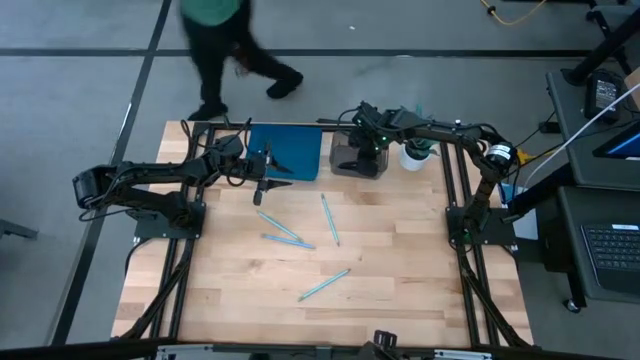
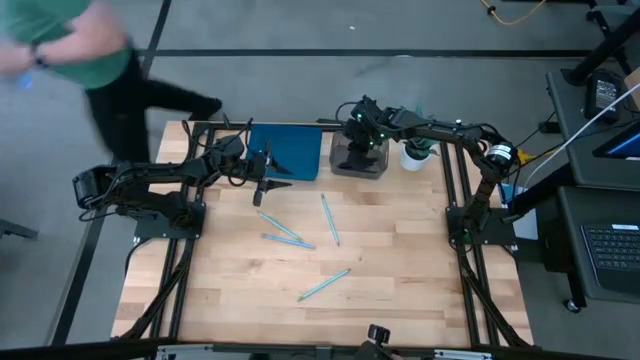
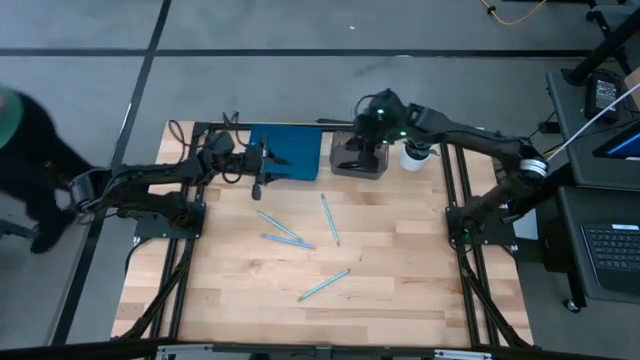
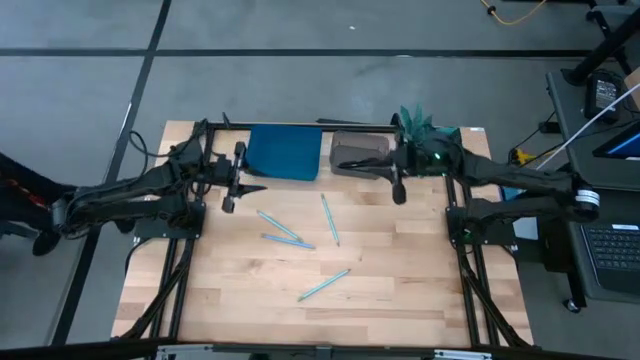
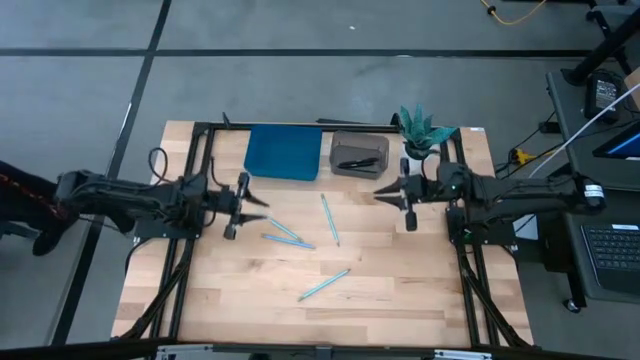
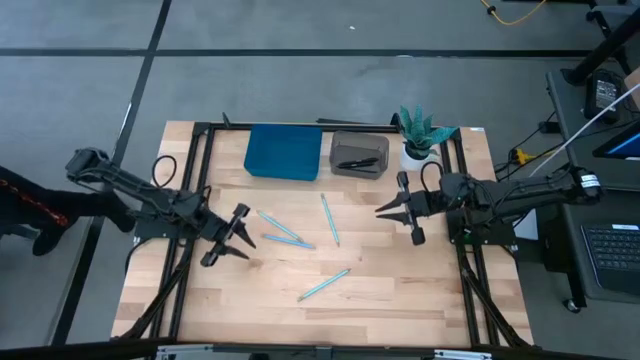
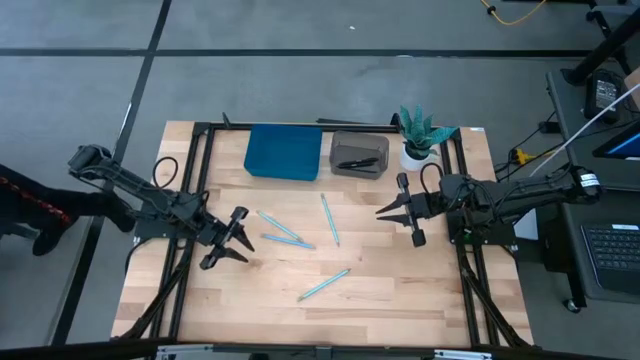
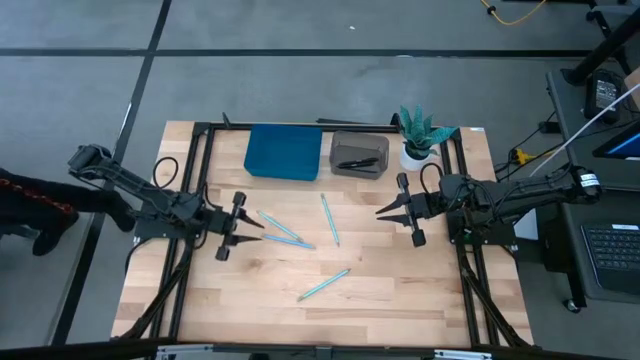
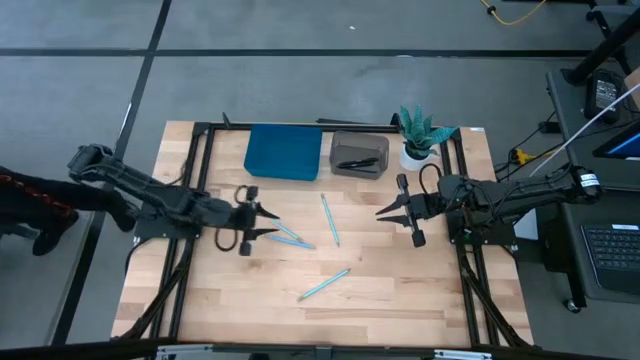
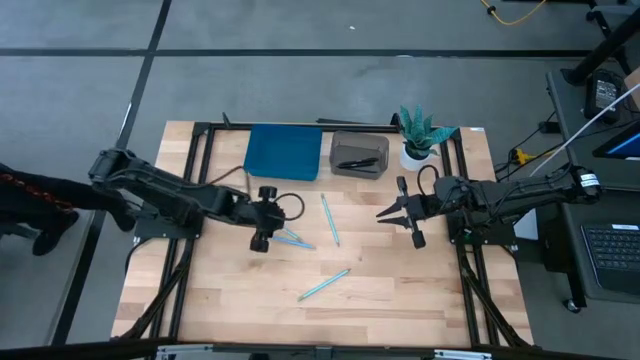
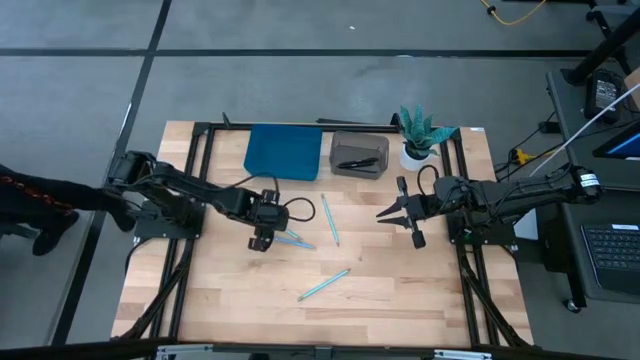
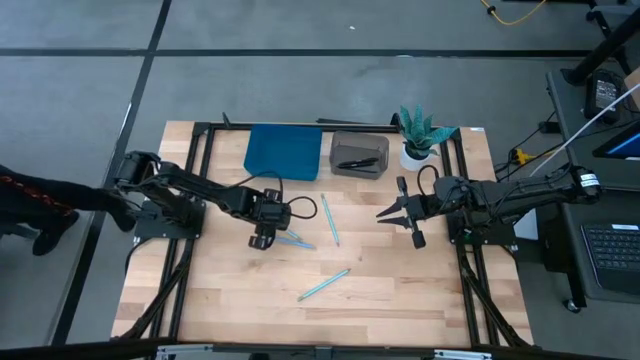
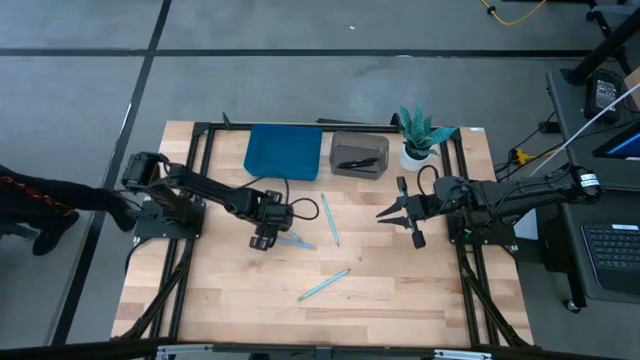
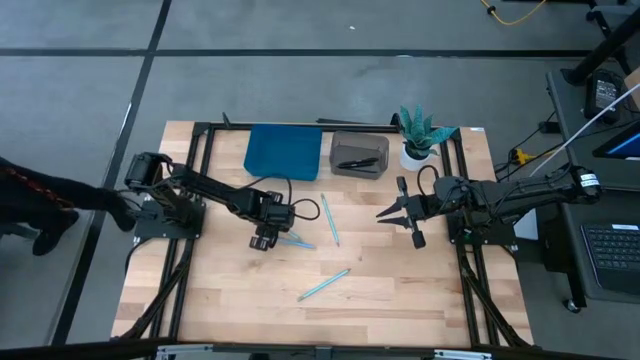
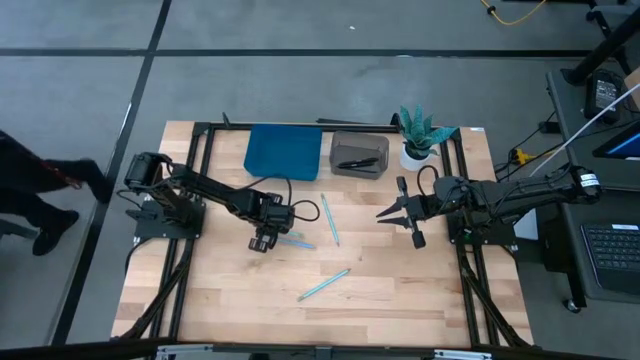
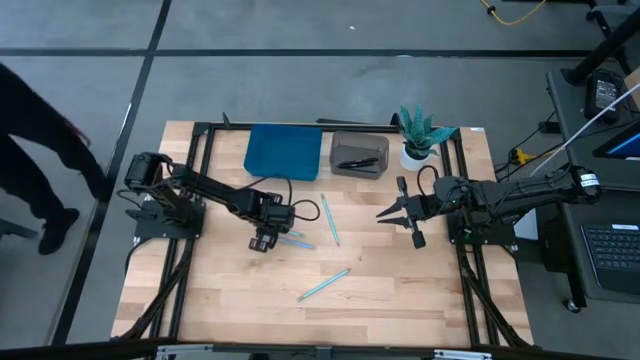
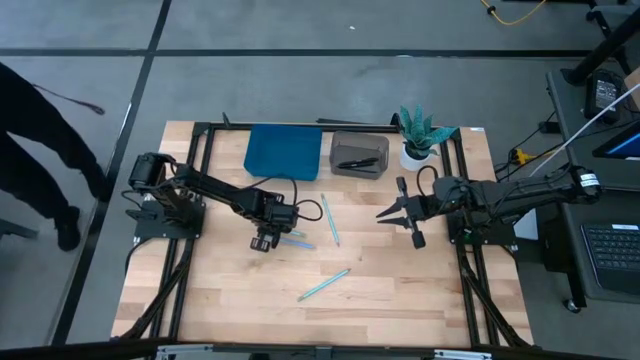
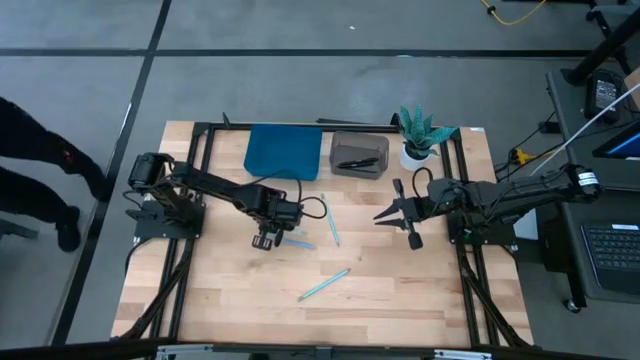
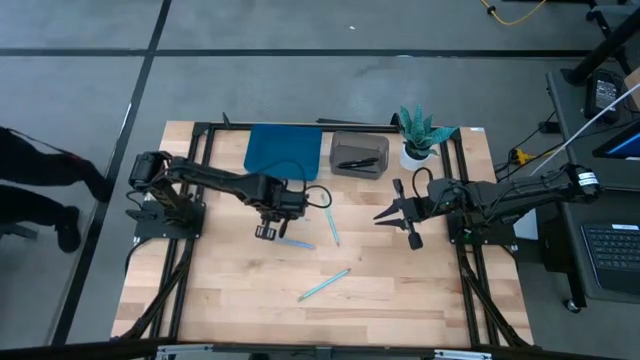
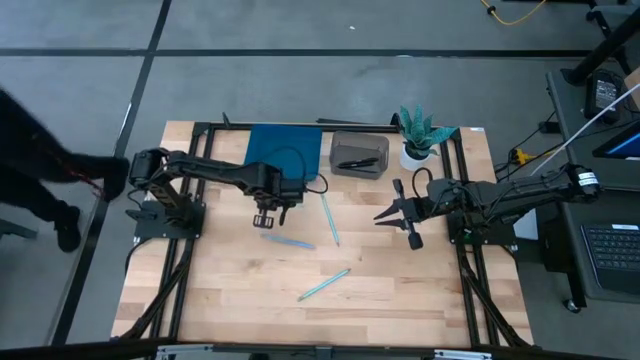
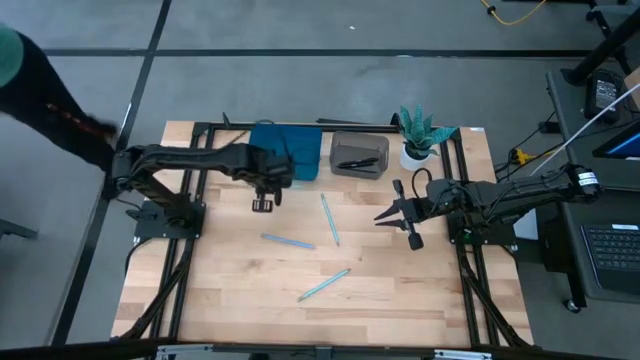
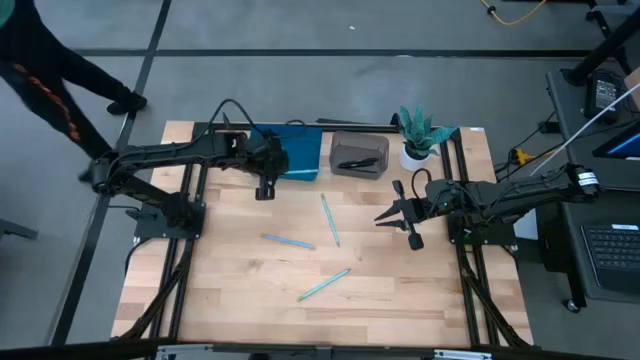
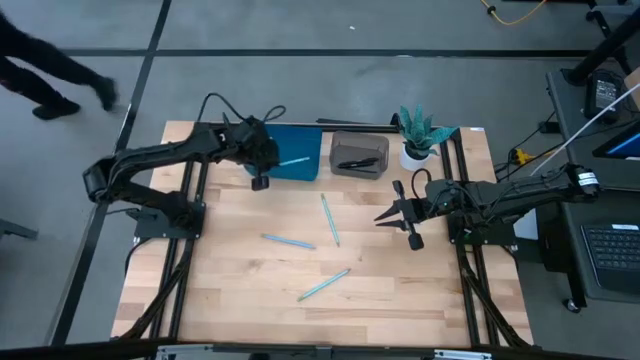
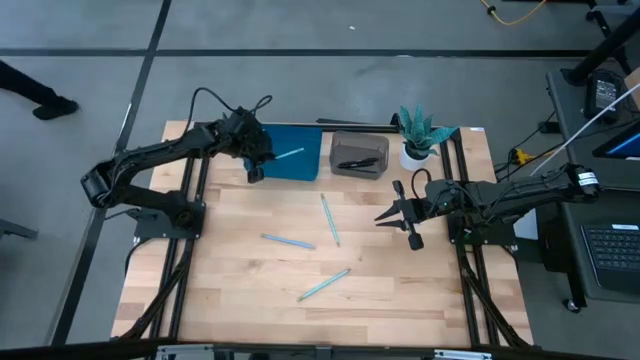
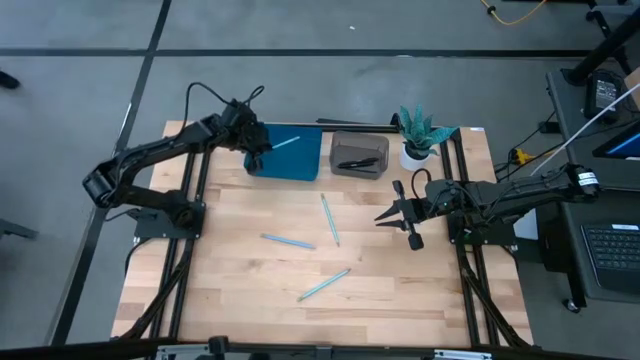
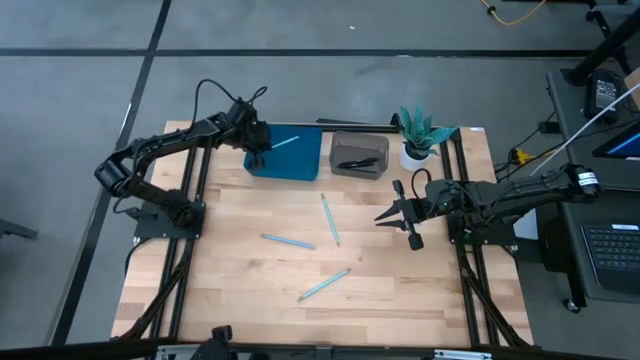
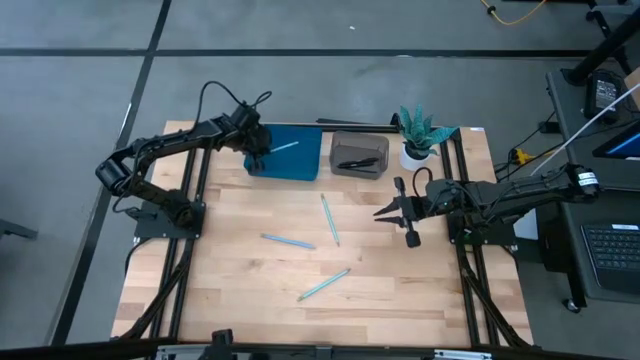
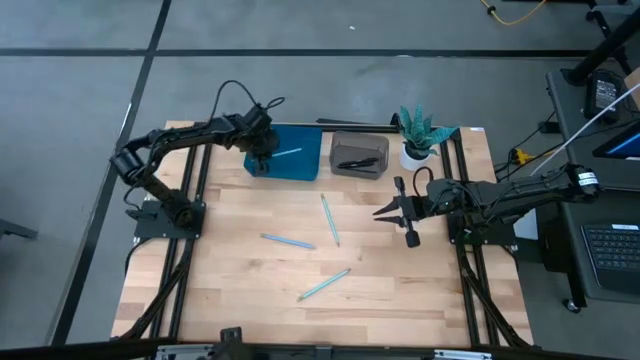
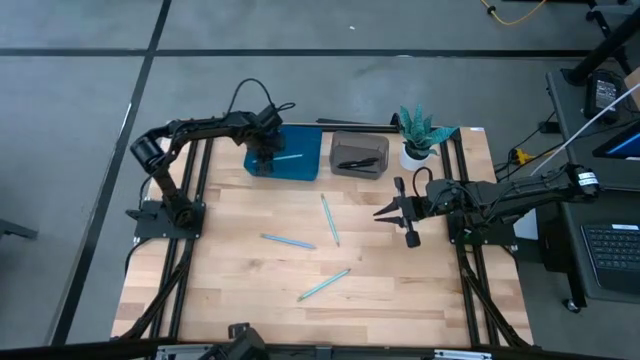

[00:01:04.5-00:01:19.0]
Task: Sort pens & pencils
Put the light green pencil into the blue bin

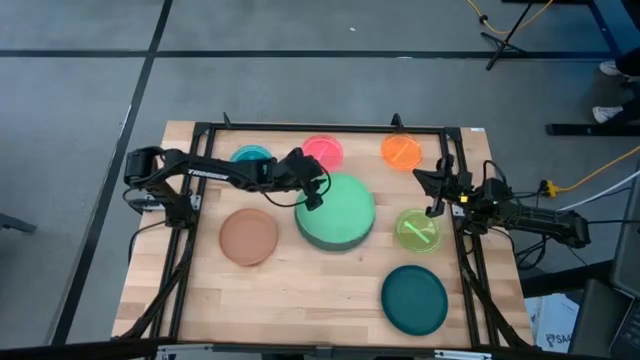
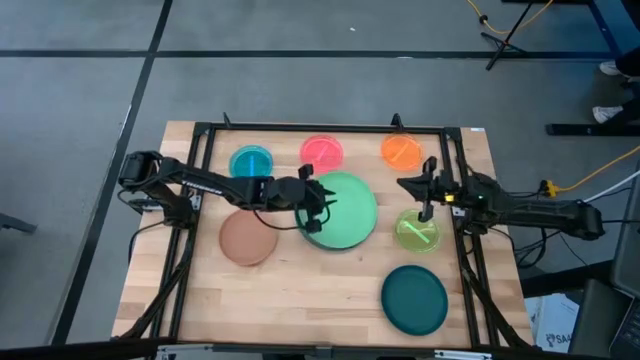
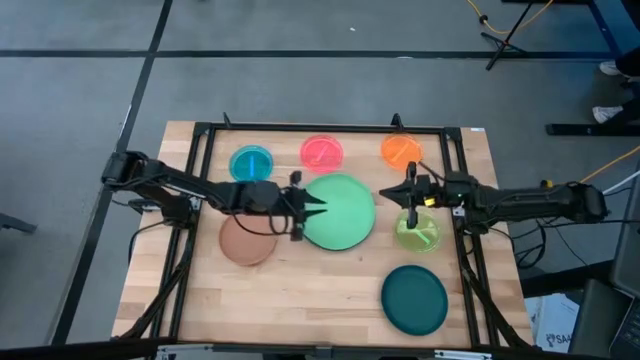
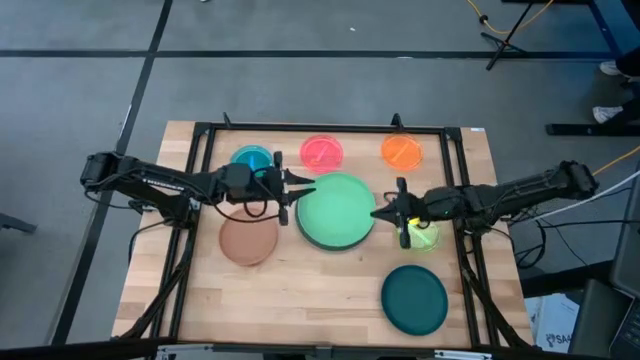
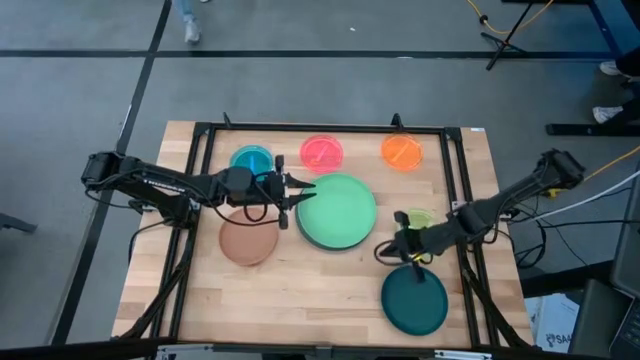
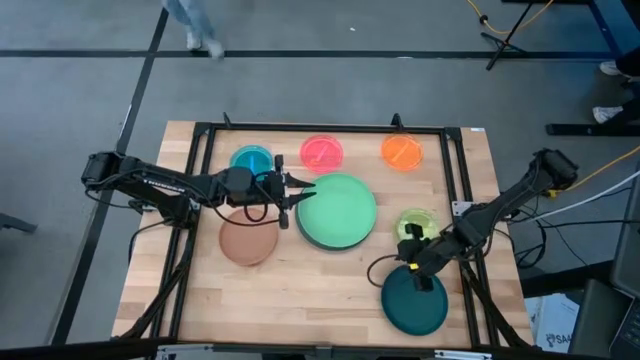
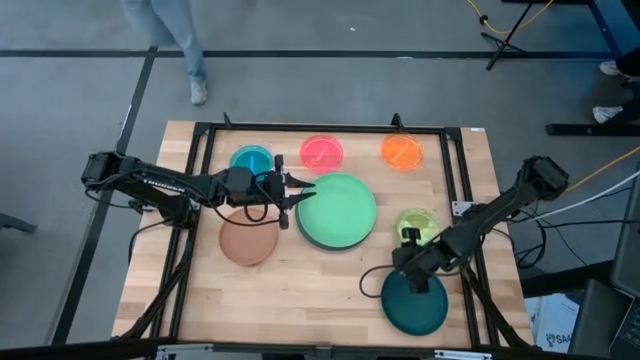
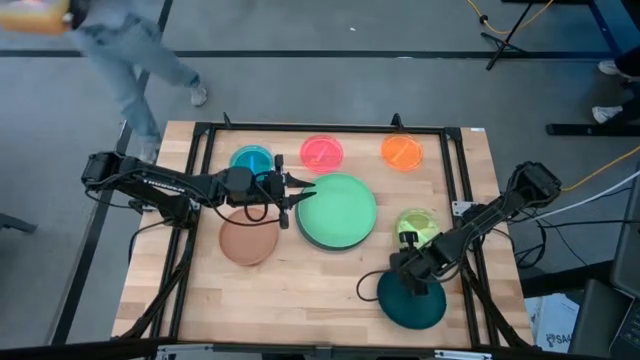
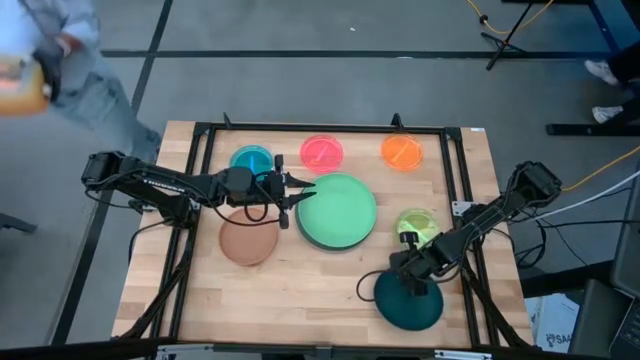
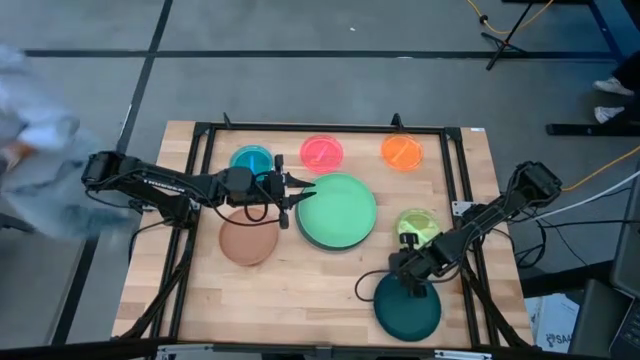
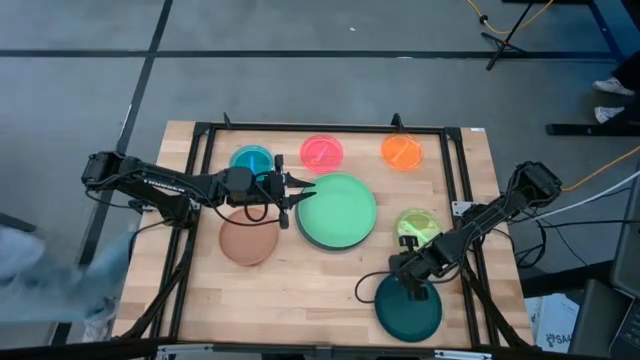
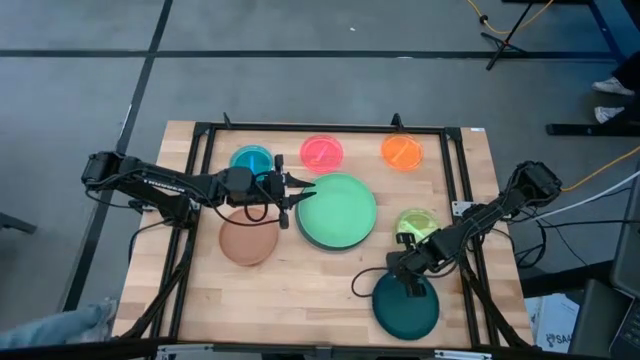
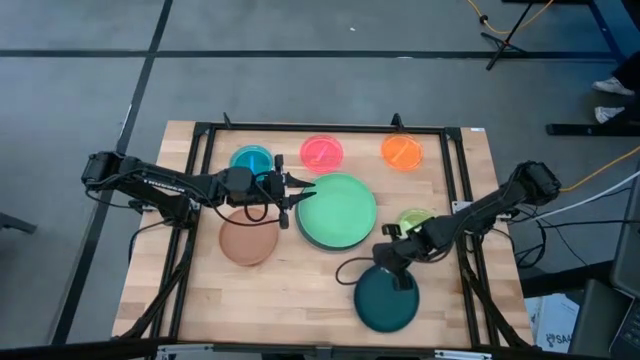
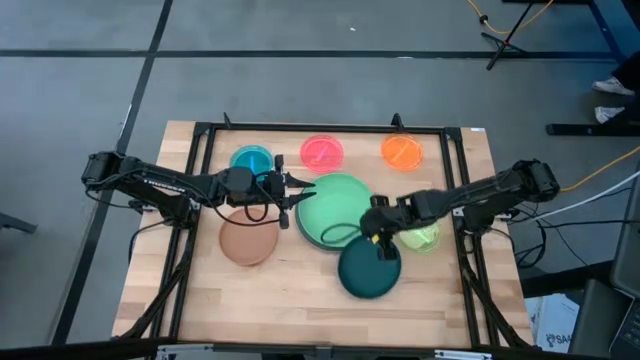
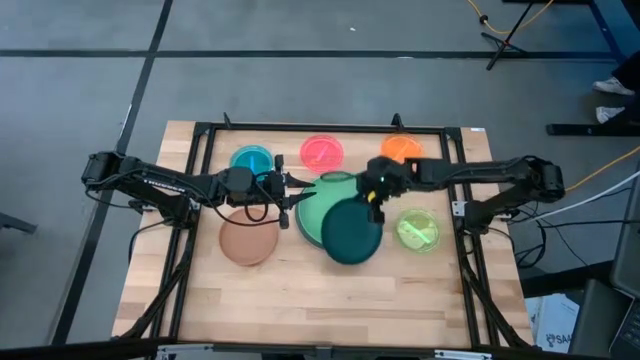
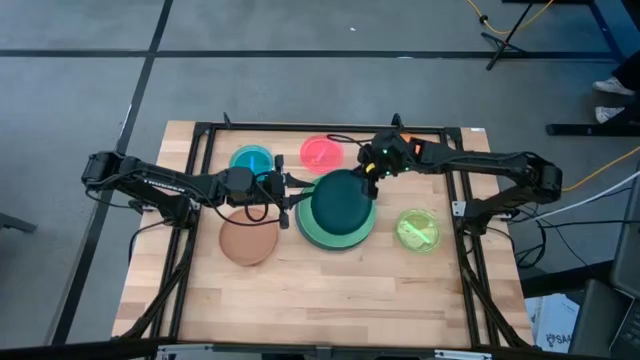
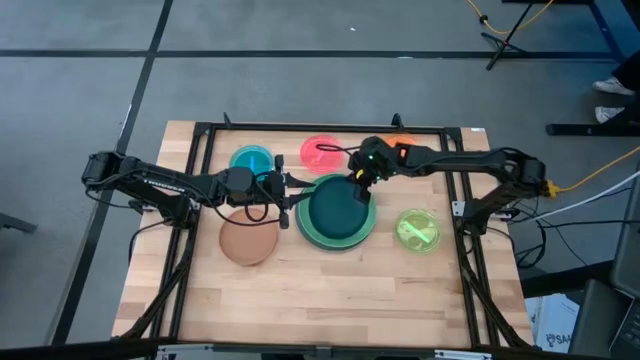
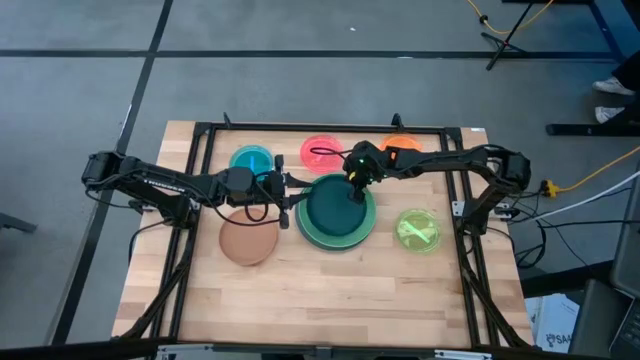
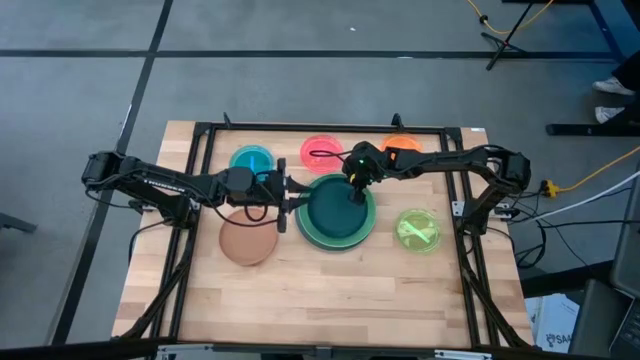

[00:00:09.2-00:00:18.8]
Task: Stack plastic plates
Stack the dark green plate on top of the light green plate
